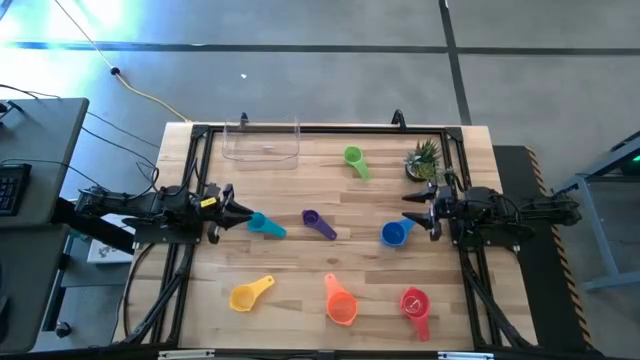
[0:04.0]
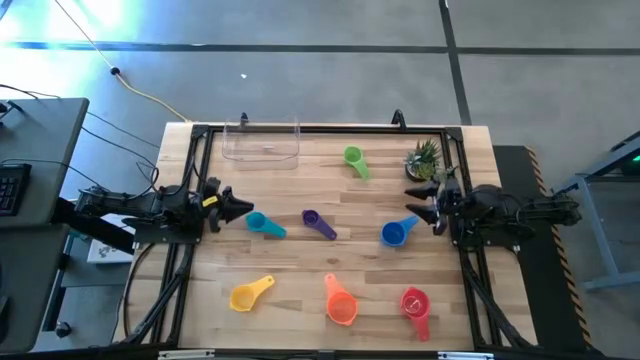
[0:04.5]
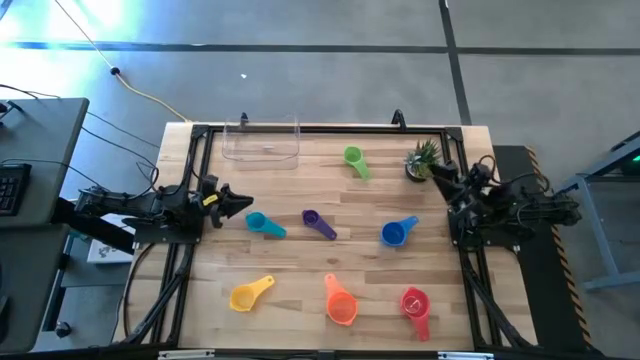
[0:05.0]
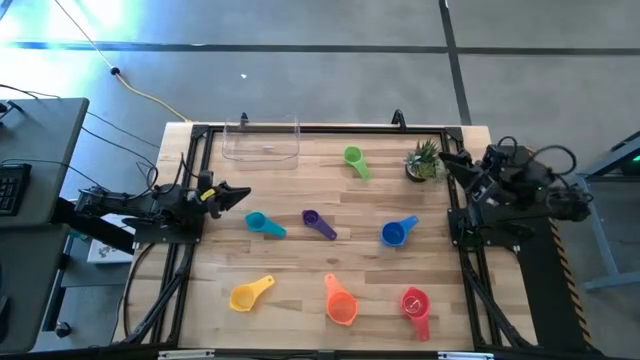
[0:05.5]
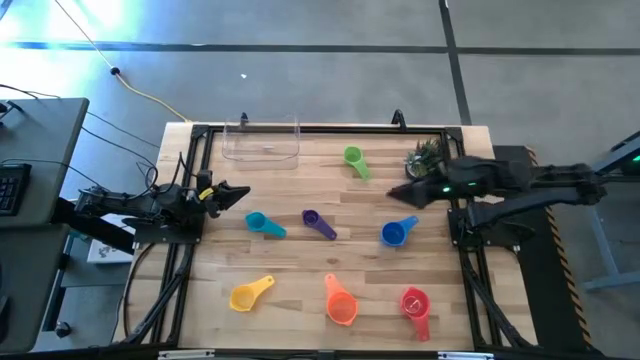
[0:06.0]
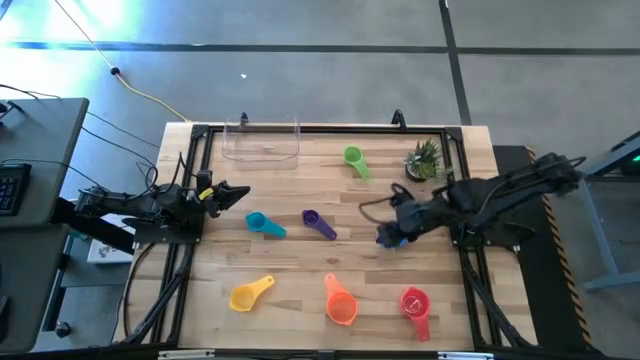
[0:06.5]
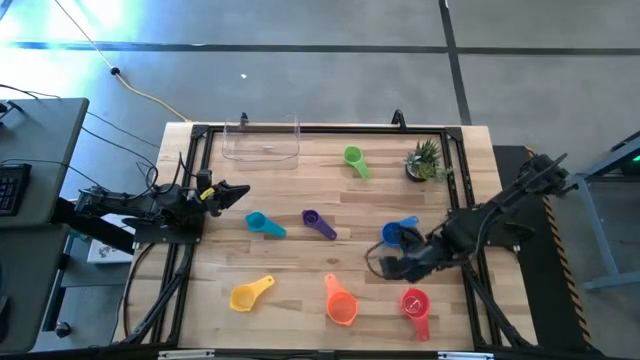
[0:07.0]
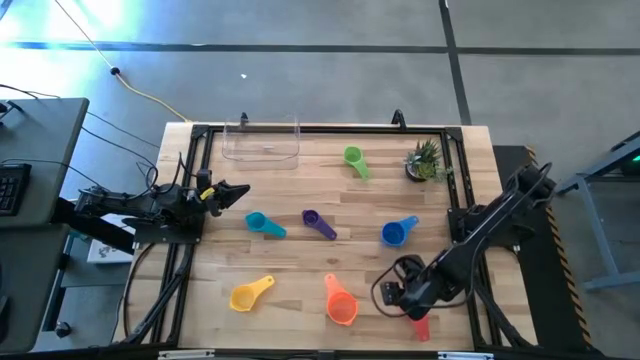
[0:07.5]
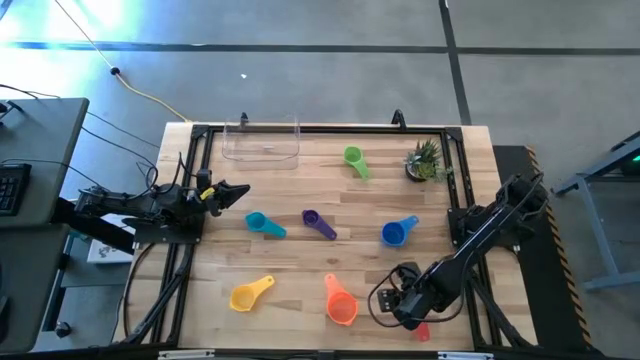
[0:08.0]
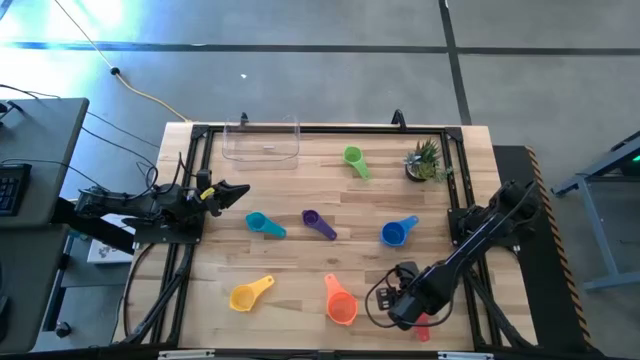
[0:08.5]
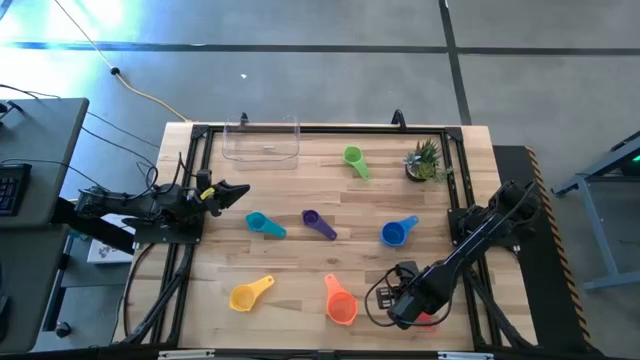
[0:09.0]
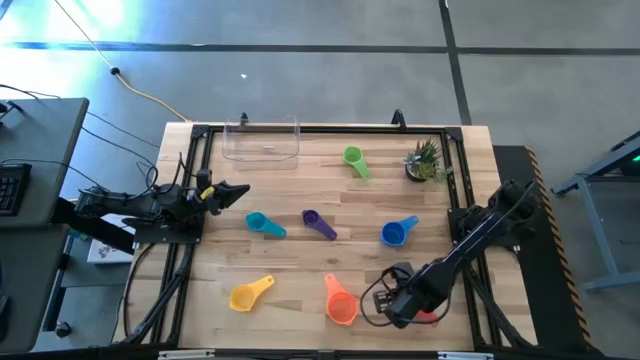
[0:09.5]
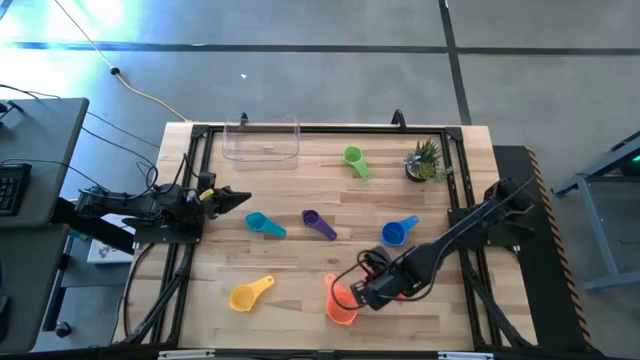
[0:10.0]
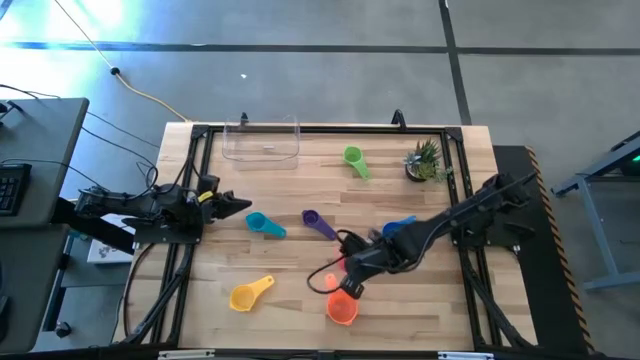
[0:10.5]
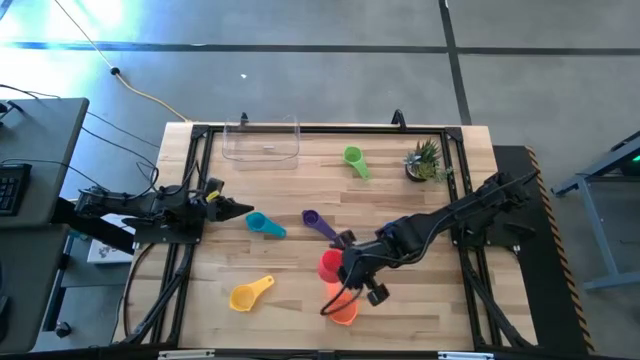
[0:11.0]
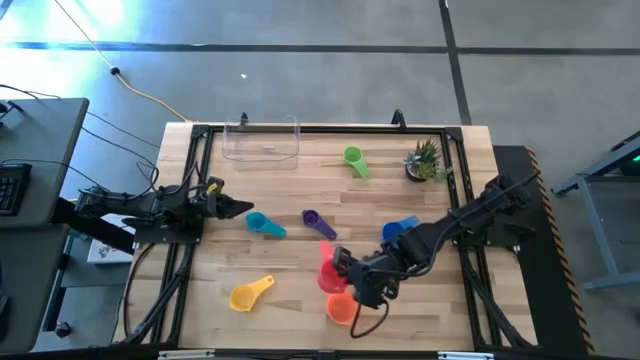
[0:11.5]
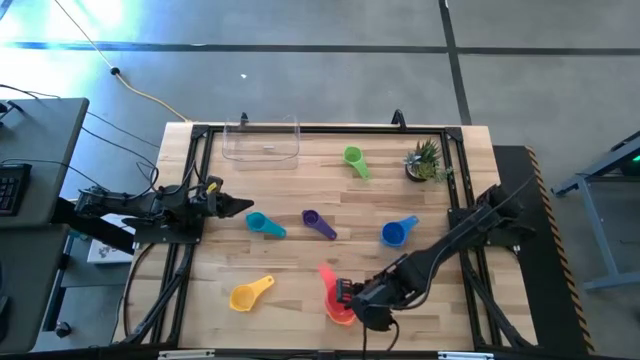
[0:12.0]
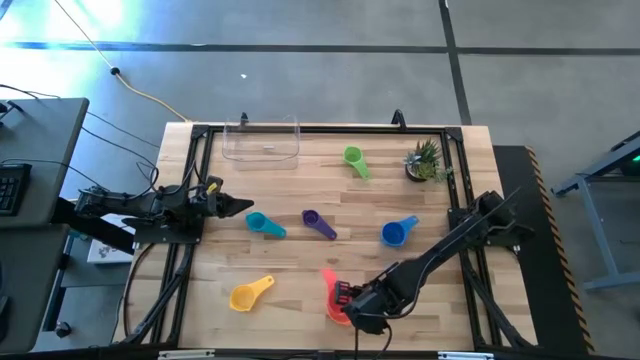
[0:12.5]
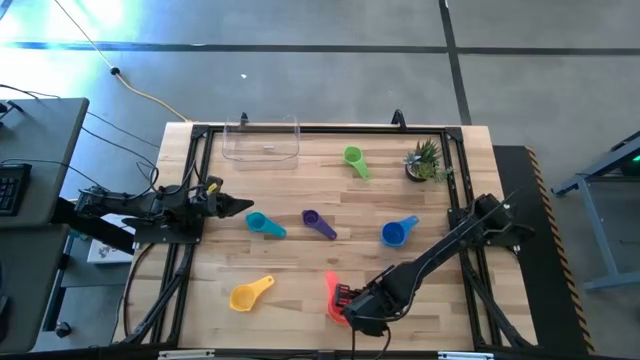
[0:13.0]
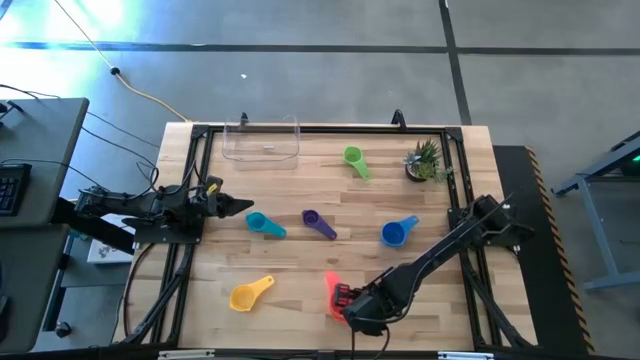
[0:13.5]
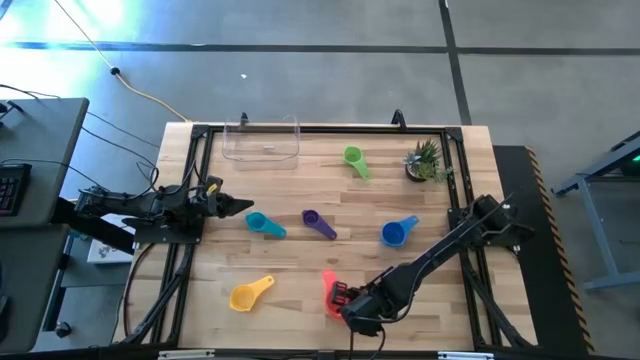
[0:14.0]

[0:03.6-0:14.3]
Task: Nest measuring cups in basket
Stack the red measuring cup on the orange measuring cup

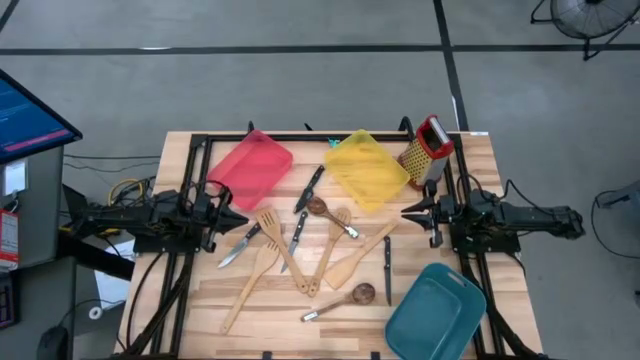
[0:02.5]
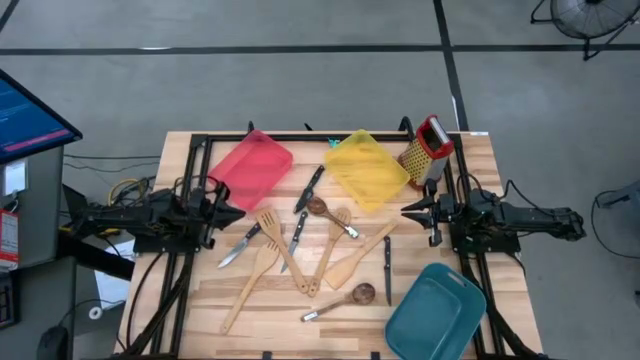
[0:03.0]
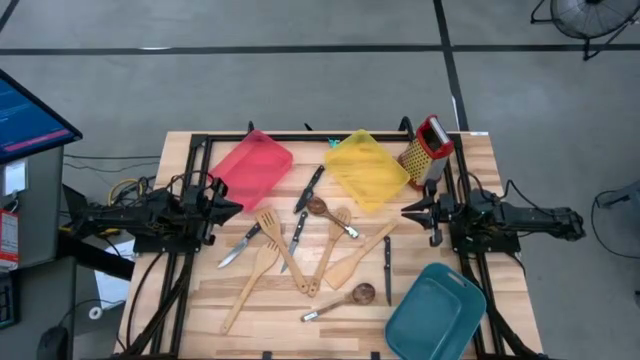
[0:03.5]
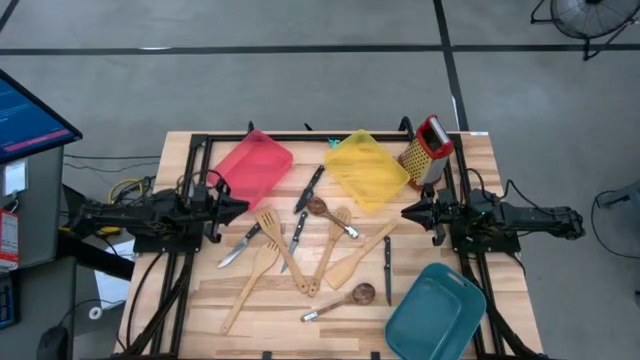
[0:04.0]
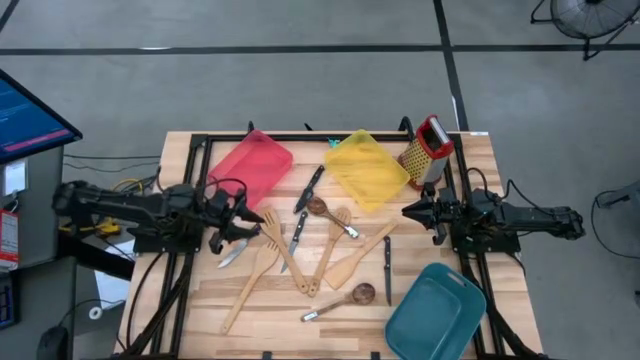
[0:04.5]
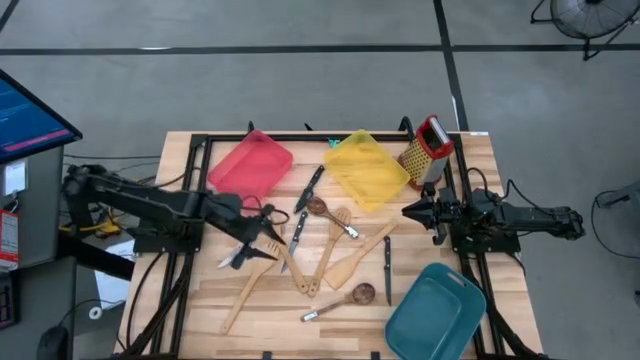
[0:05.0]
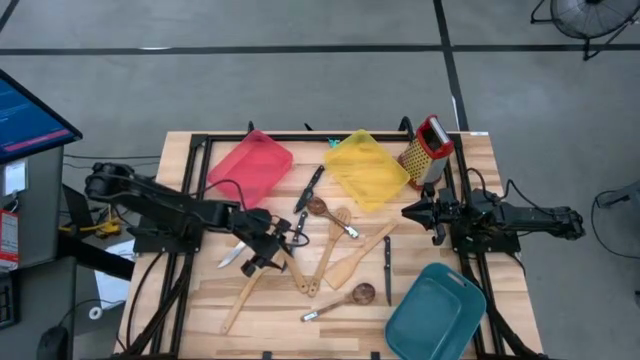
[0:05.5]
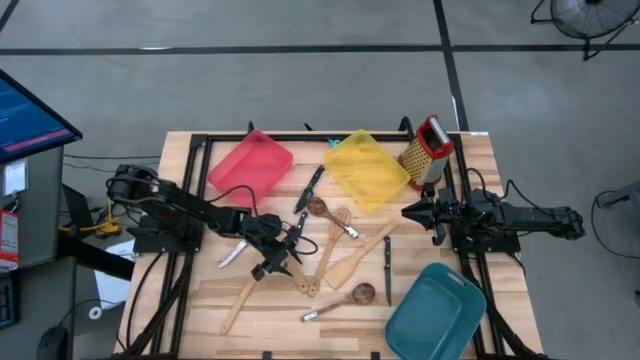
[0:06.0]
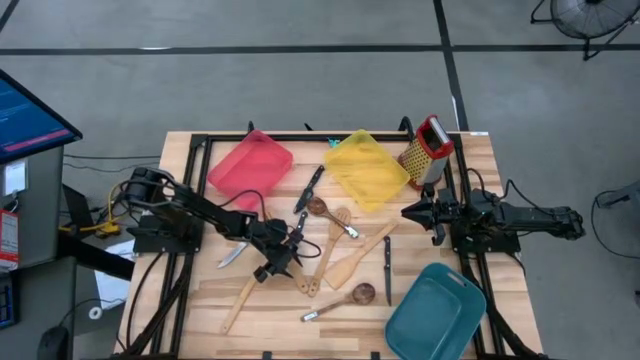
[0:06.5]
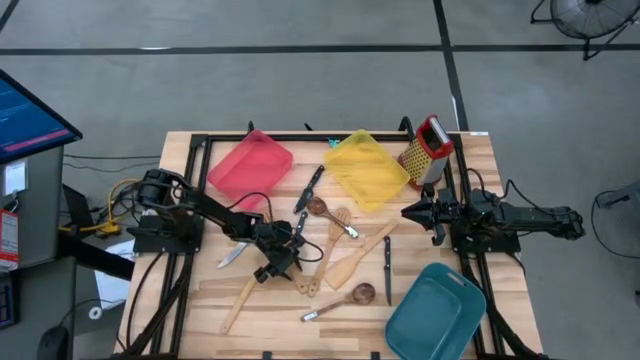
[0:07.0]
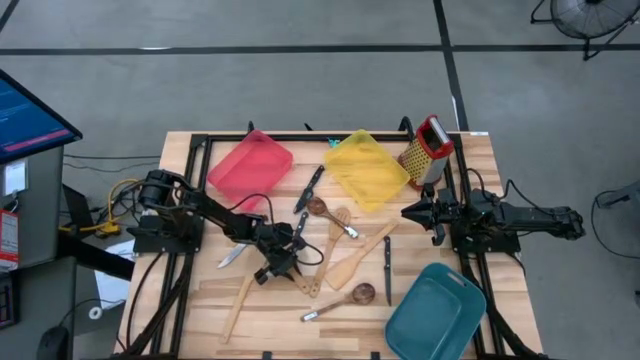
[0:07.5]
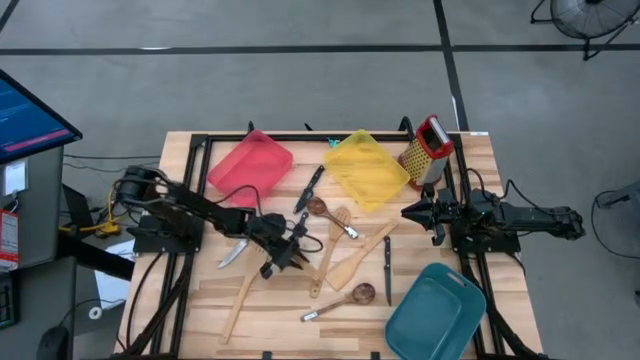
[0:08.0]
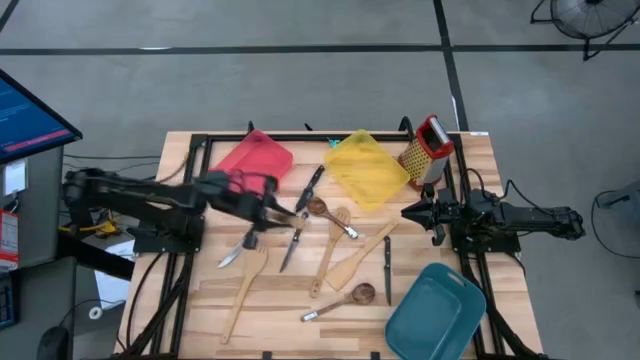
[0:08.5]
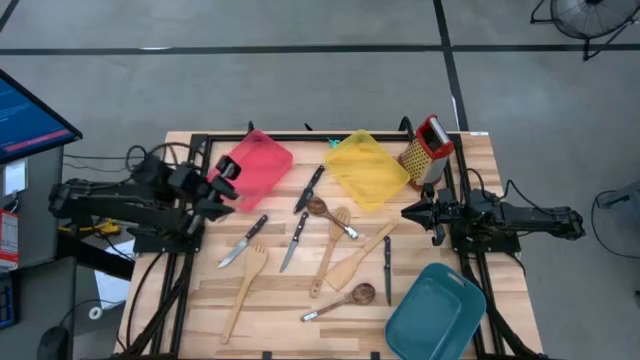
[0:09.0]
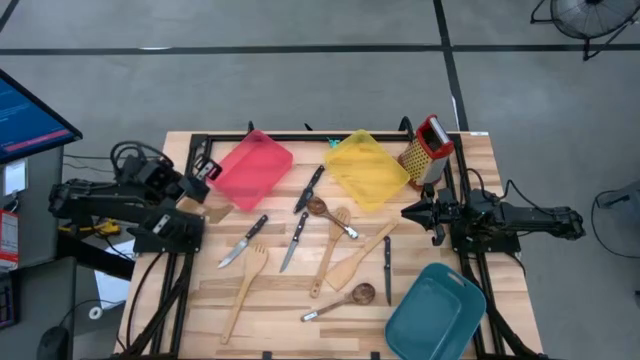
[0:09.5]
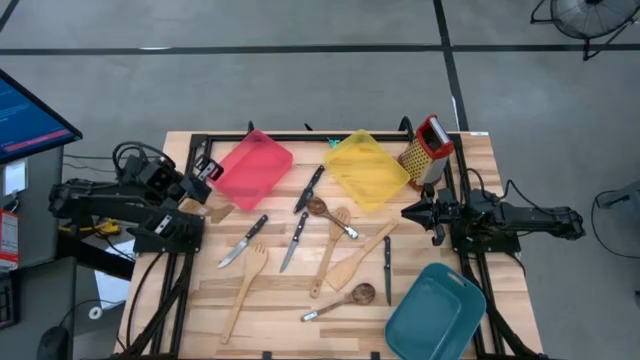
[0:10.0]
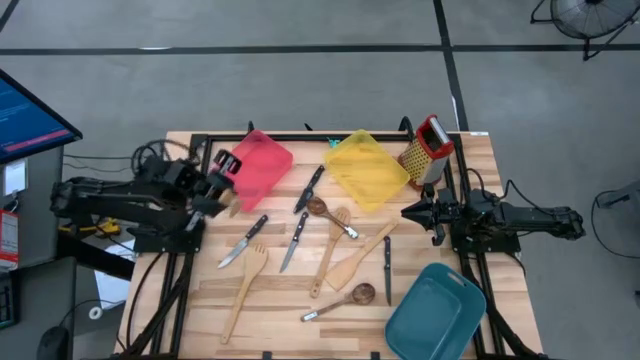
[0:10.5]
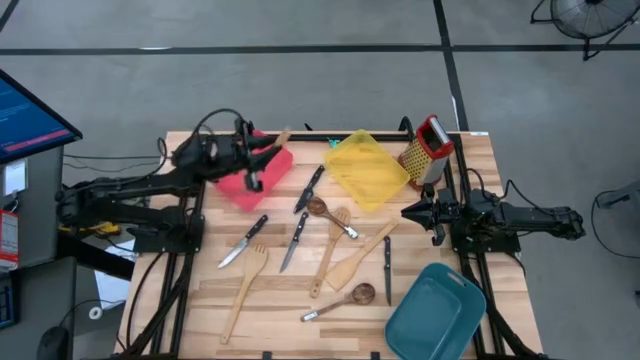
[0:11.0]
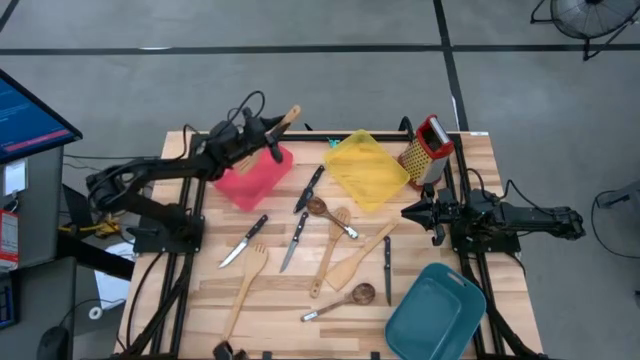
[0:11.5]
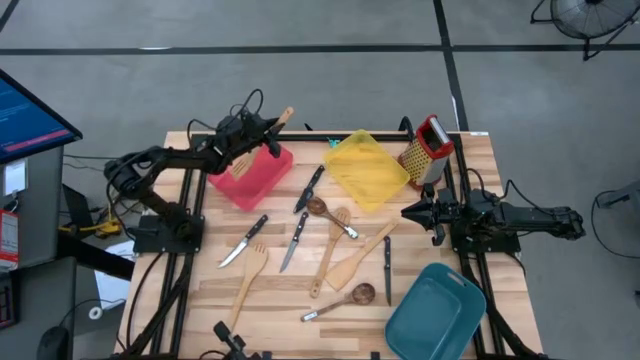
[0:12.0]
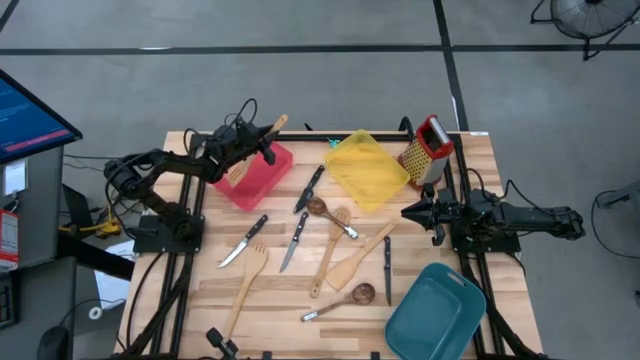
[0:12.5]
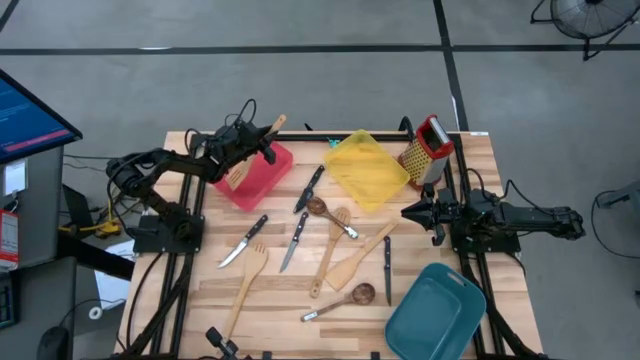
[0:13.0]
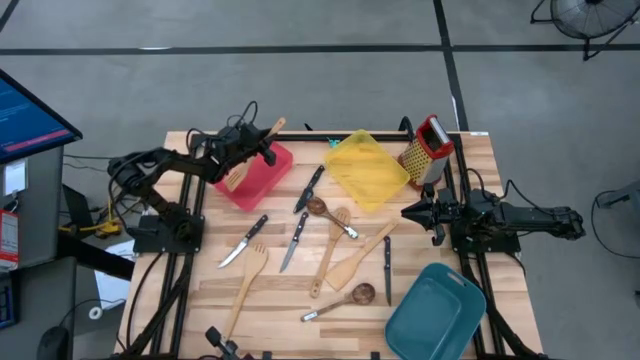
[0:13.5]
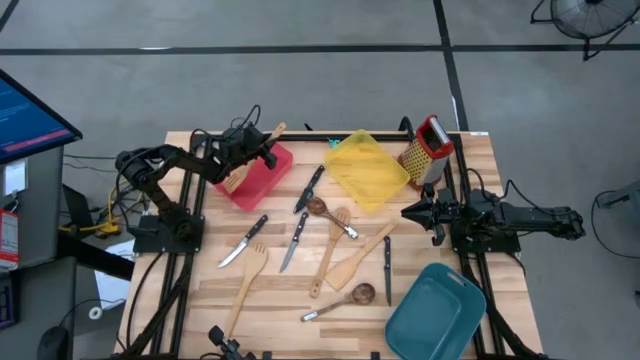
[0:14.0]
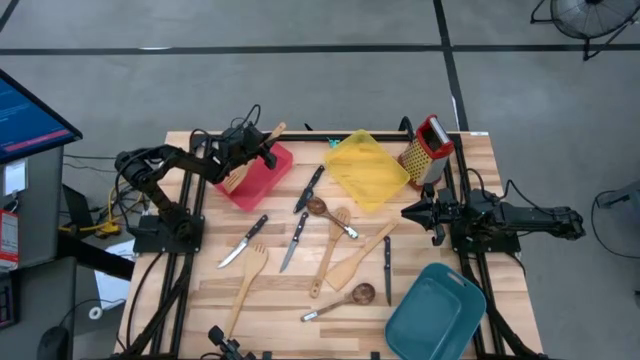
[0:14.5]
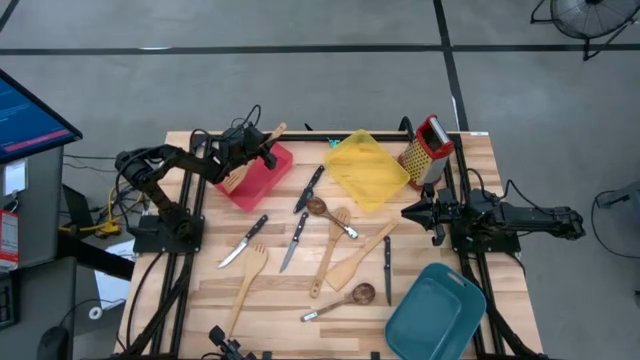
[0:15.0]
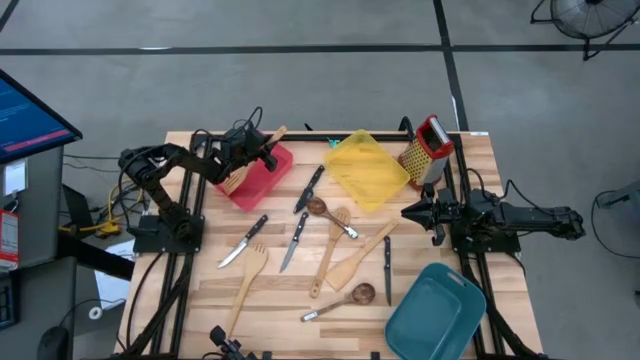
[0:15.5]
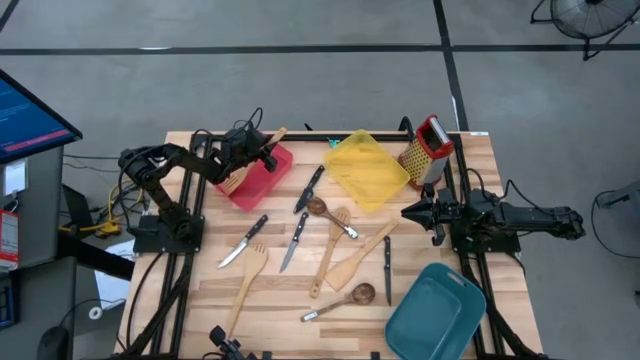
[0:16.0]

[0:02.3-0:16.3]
Task: Pick & Place Kitchen Items
Put the wooden slotted spatula into the red bin
